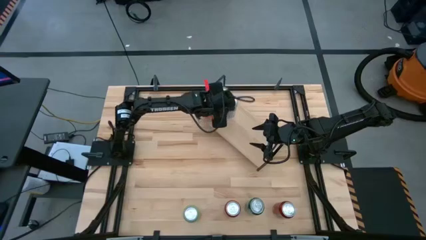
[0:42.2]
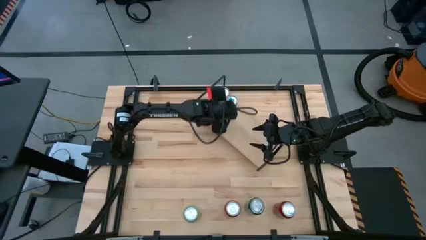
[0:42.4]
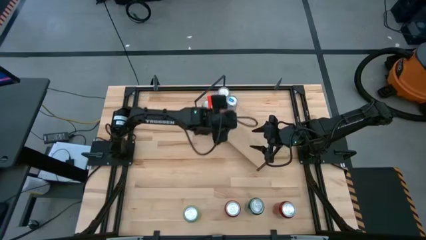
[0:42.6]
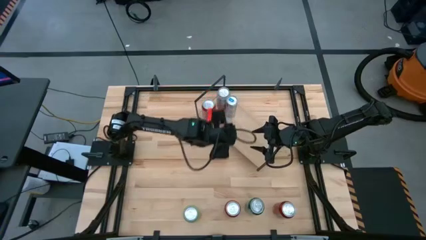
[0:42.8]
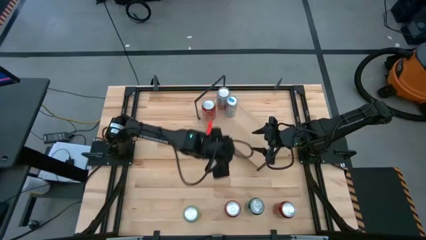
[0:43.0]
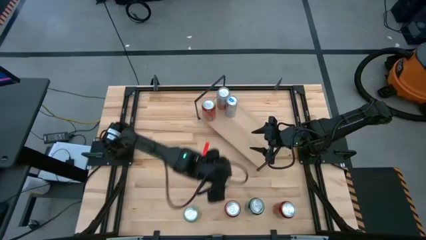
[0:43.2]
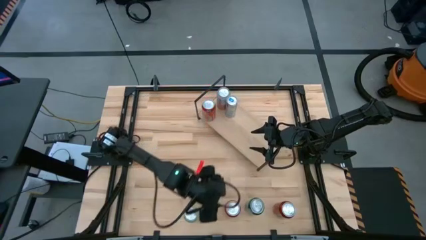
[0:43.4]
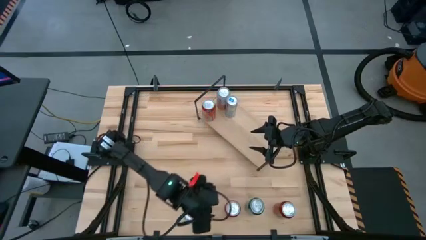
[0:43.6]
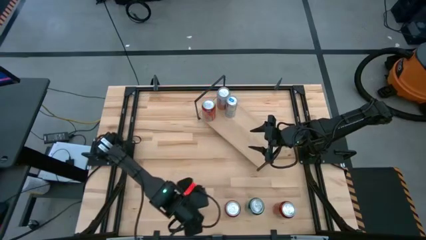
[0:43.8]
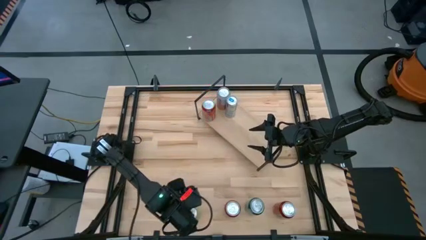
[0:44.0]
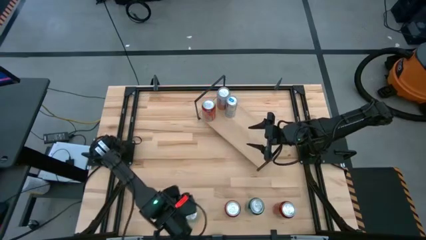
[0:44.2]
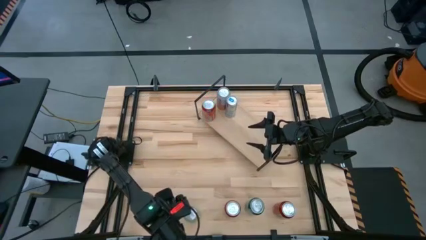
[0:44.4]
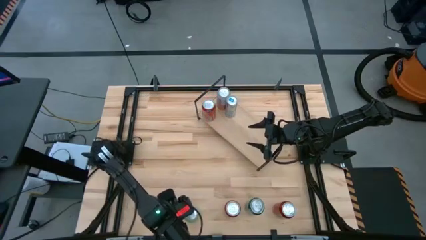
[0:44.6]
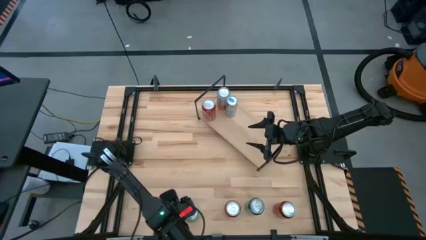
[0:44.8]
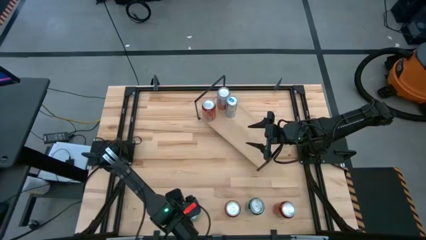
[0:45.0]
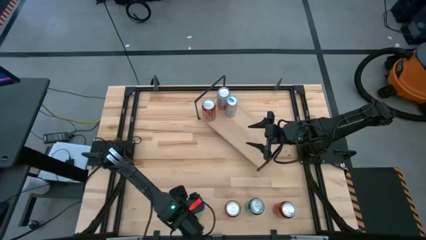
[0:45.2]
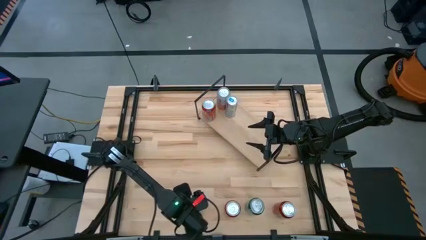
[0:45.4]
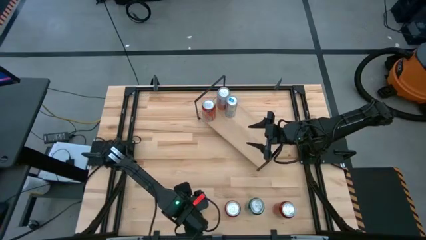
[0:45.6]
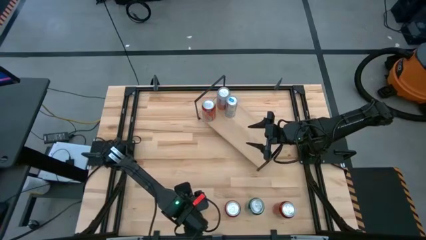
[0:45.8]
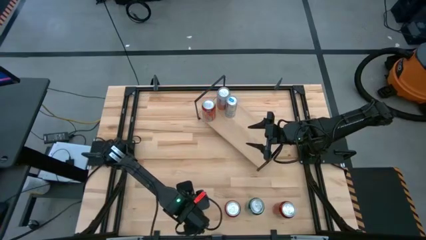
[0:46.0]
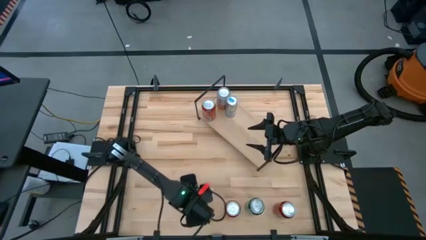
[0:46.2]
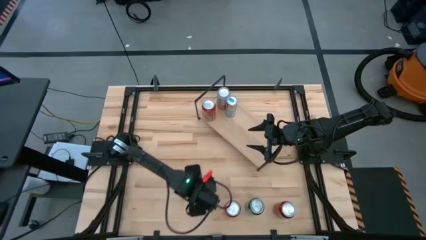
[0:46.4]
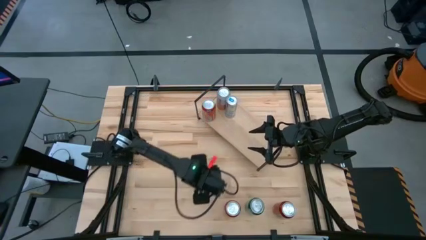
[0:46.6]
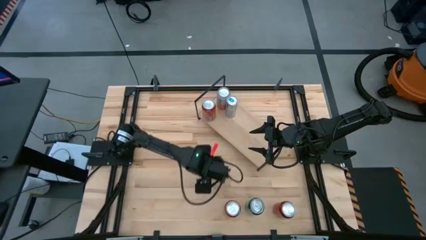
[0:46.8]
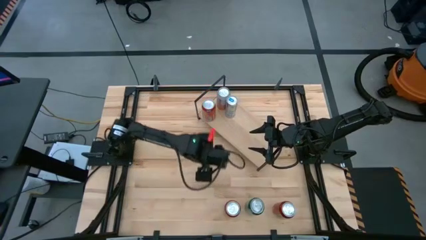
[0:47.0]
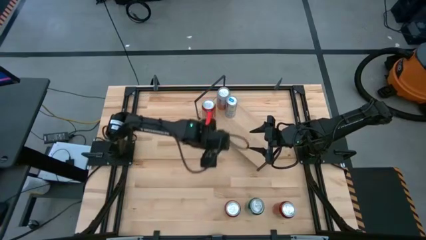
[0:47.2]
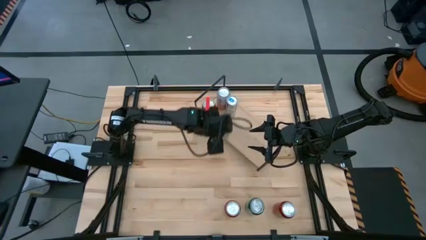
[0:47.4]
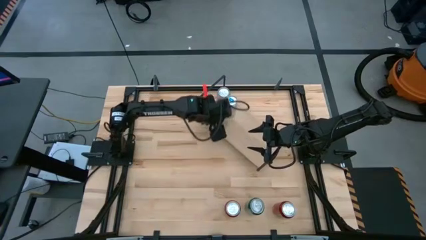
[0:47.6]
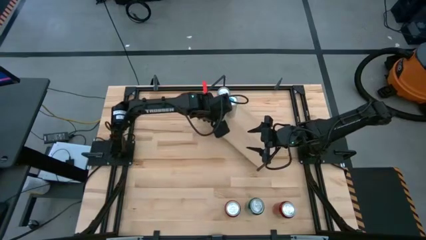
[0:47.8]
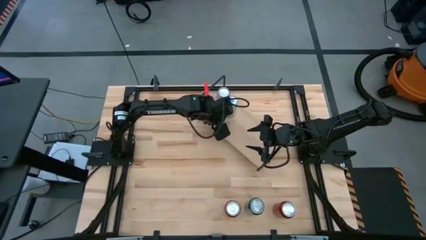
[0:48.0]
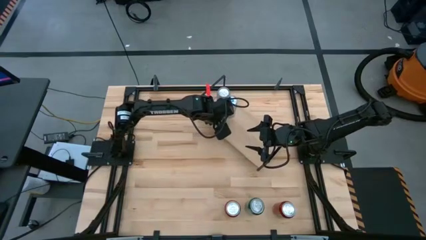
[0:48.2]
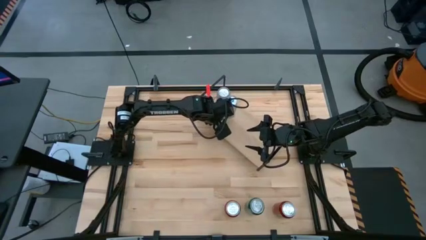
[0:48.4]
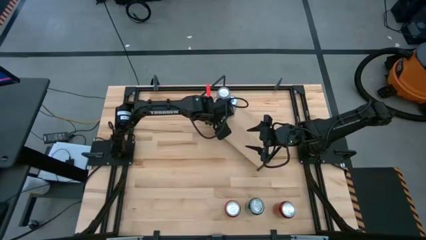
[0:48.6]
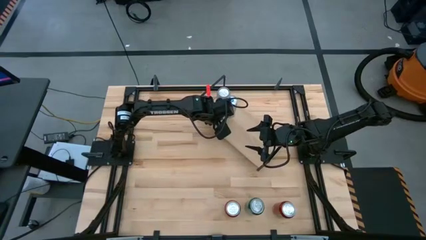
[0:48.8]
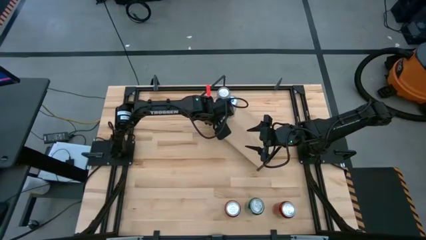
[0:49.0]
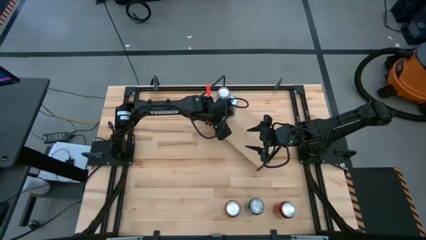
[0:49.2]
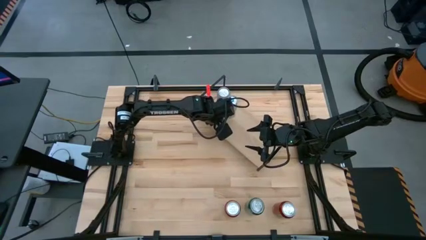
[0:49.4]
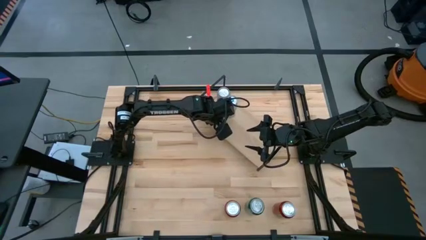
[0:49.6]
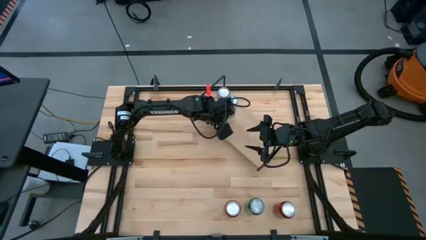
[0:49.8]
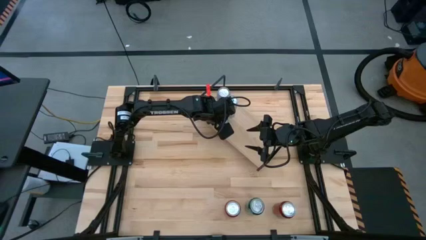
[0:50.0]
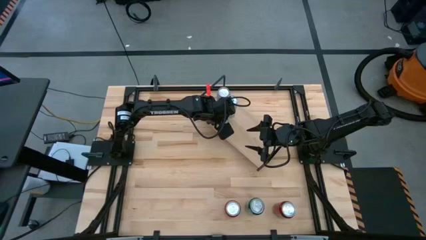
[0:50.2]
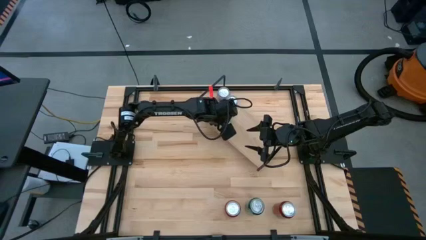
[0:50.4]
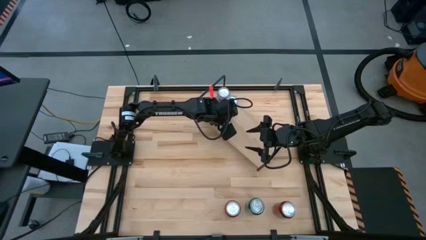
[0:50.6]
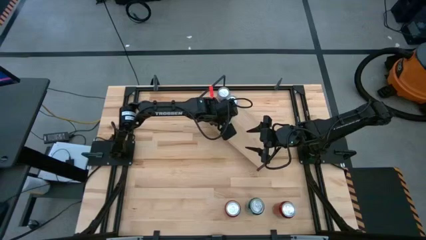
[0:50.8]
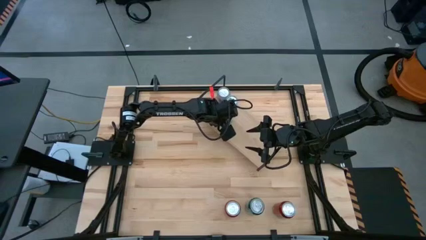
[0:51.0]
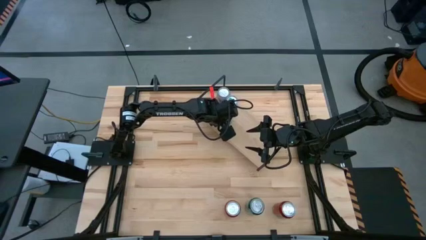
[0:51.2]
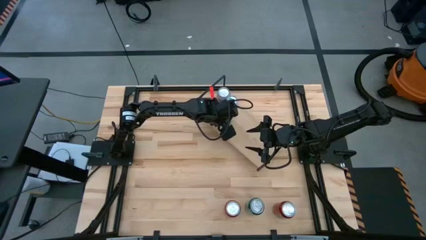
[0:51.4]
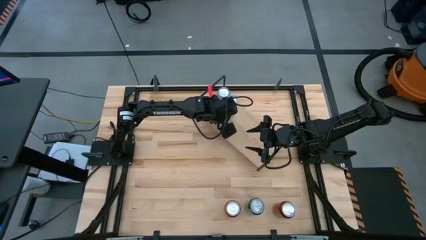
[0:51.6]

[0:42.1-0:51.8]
Task: Place canned beverage on shelf
Put the light green soda can on the shelf

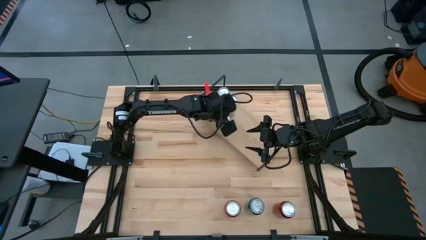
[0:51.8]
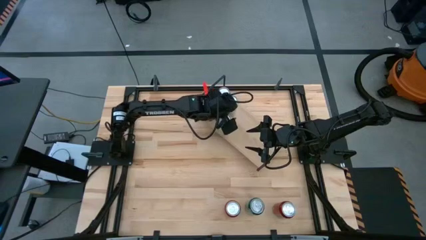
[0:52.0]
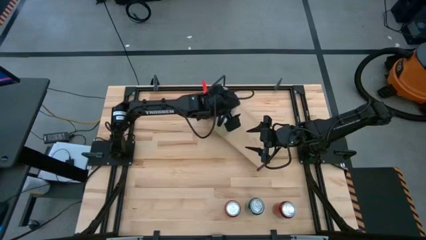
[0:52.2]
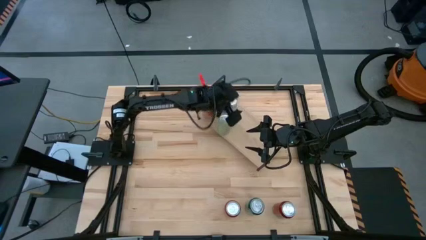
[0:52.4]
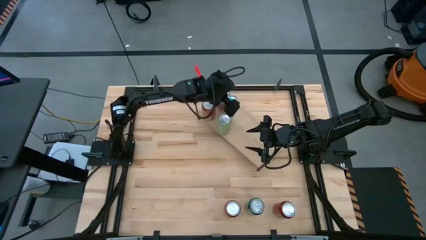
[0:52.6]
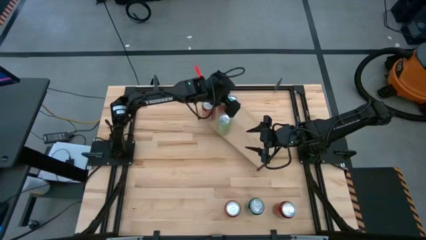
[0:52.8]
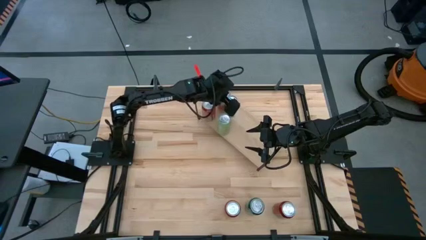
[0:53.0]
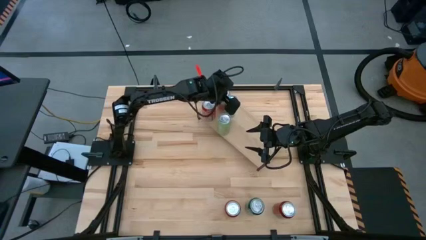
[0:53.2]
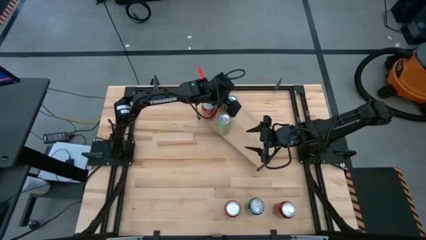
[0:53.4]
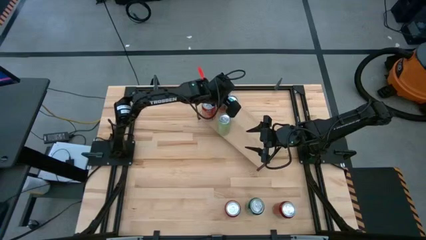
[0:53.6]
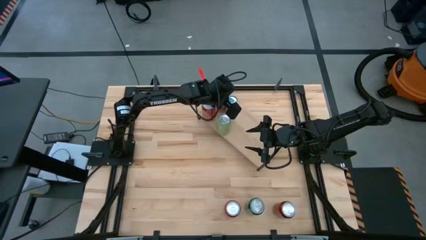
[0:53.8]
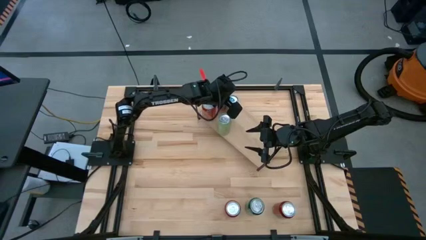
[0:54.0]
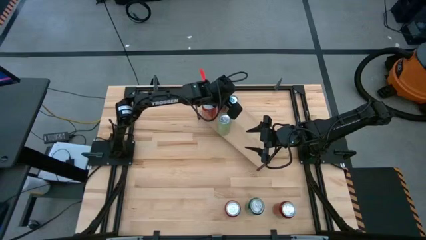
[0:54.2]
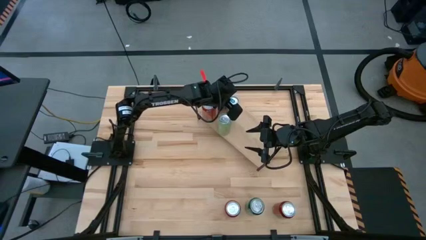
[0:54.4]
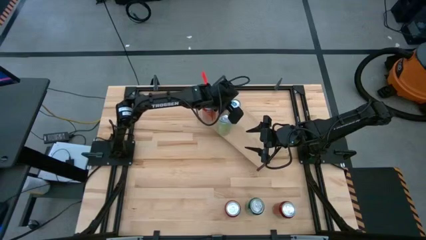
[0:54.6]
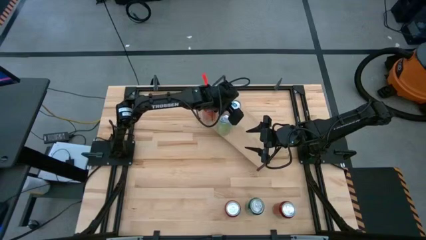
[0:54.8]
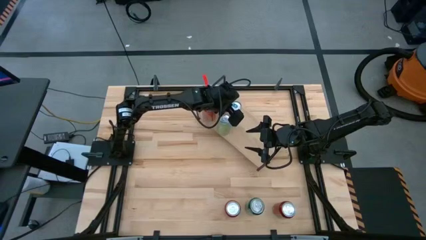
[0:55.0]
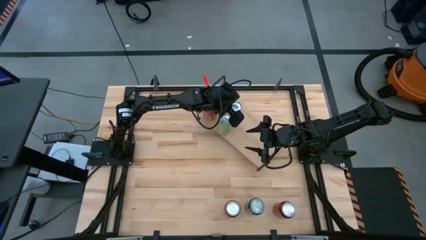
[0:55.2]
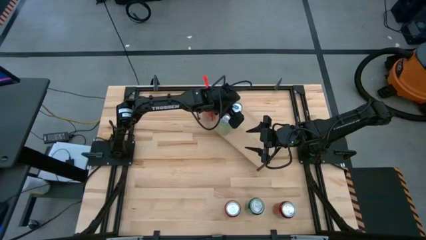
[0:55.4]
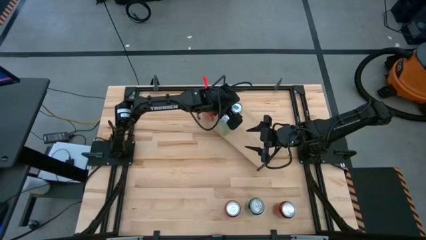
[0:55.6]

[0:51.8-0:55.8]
Adjust the blue soda can on the shelf
